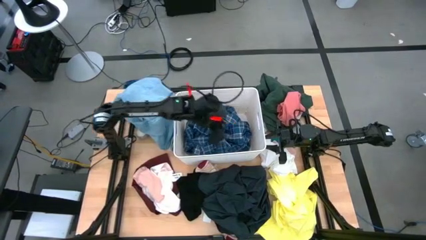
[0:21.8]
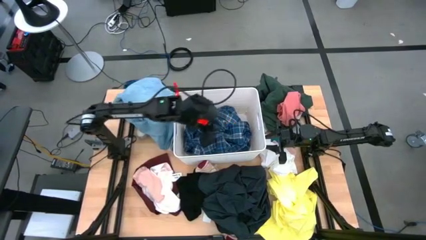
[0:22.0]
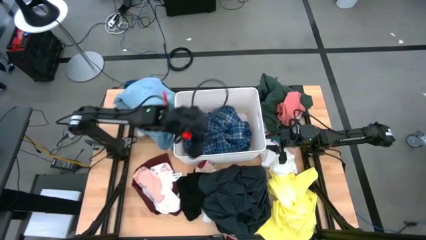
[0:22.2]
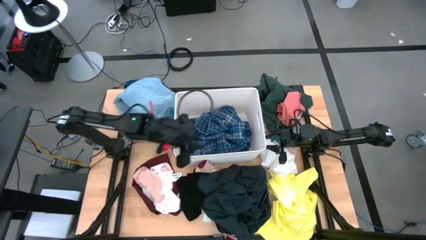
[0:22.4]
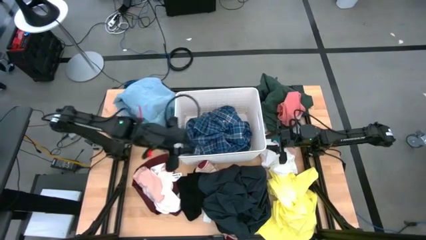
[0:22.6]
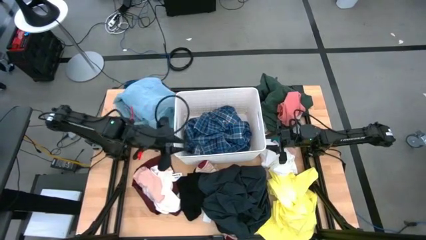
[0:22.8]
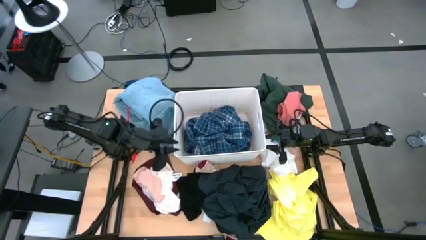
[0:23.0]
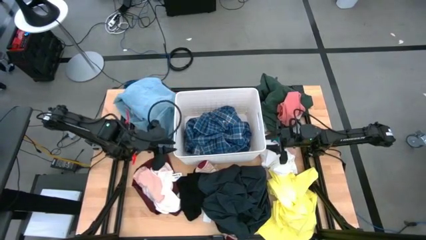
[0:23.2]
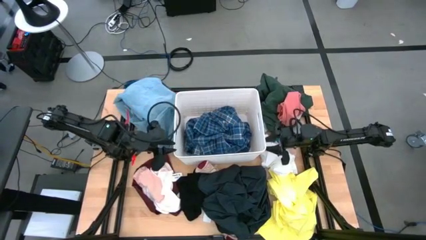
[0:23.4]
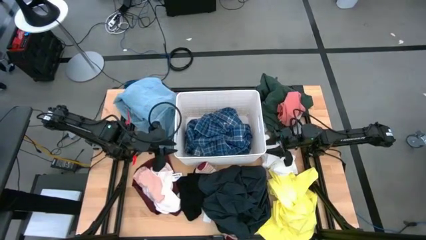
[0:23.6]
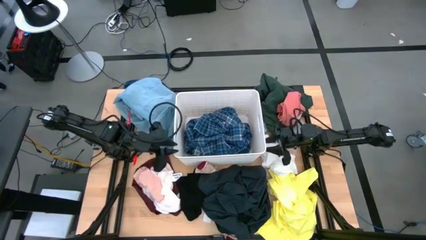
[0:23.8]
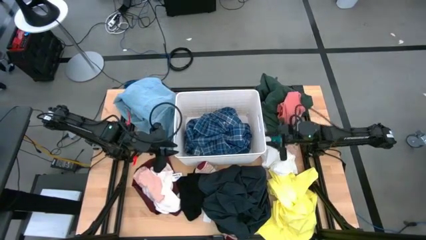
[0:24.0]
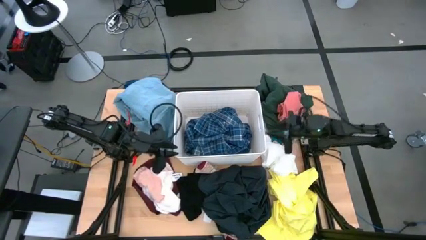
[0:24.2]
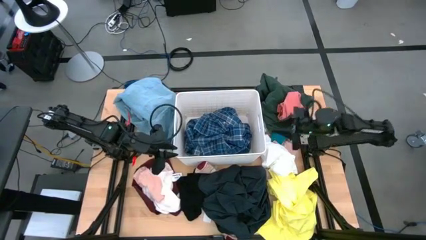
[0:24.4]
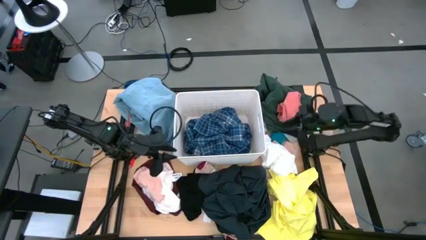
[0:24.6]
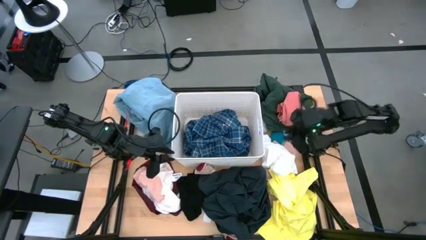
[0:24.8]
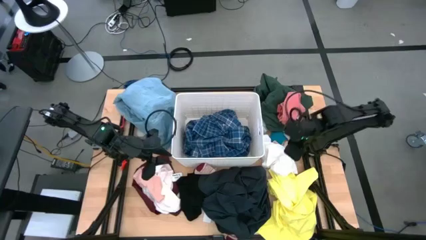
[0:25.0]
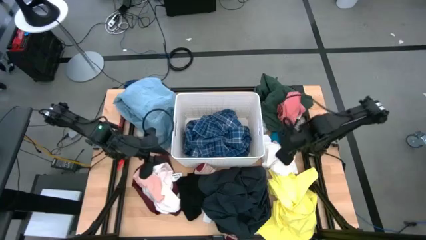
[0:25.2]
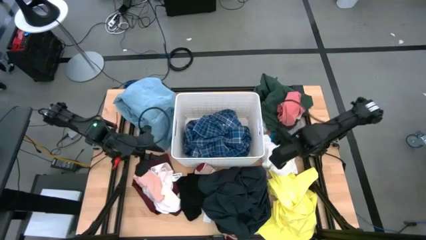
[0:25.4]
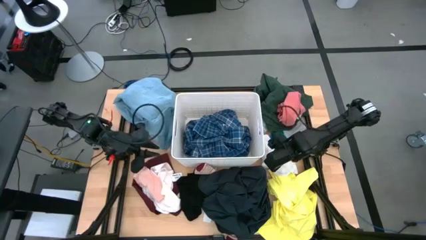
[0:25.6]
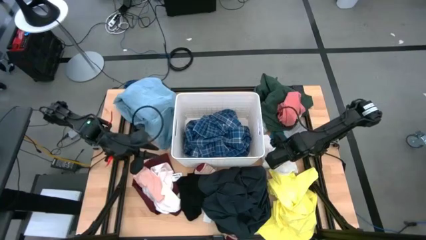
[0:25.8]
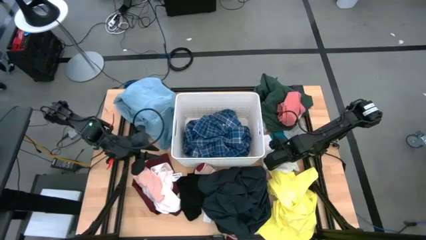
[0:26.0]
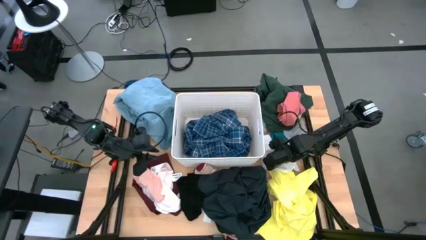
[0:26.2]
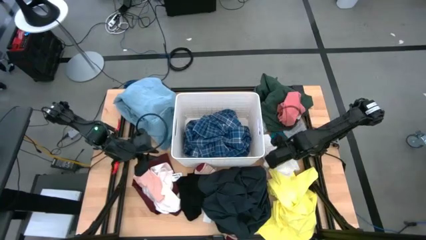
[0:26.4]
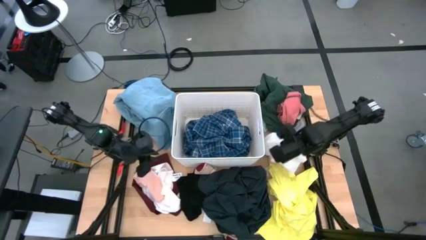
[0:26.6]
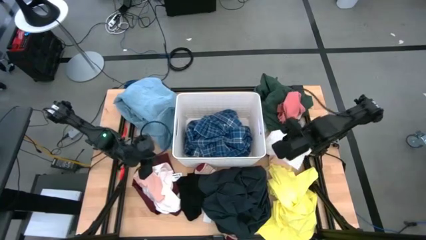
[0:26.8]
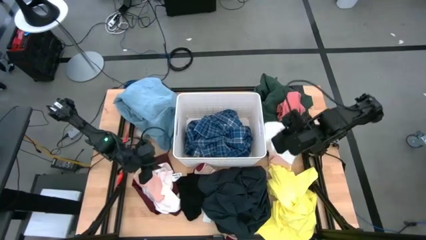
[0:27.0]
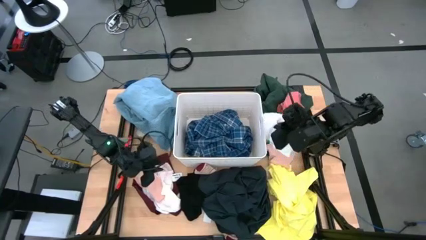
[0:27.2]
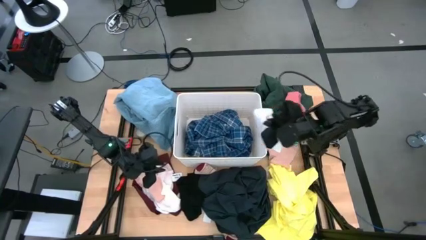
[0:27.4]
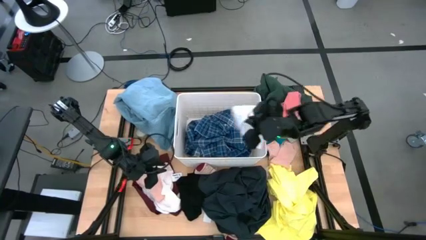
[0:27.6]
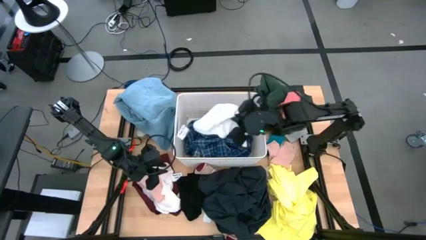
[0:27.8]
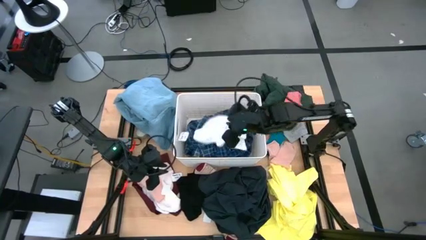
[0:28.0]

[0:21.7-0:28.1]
Task: Sort clothes
Put the white shirt into the laundry bin

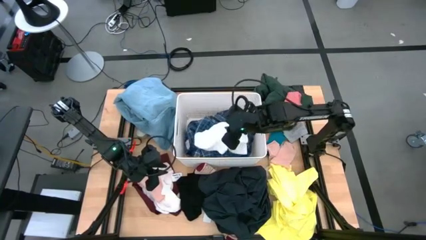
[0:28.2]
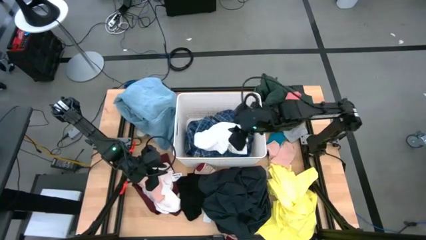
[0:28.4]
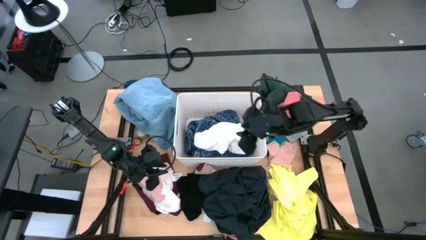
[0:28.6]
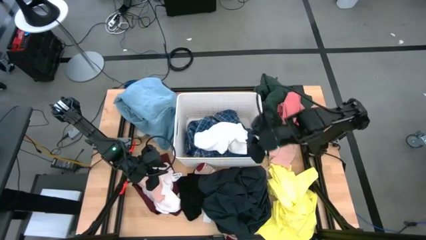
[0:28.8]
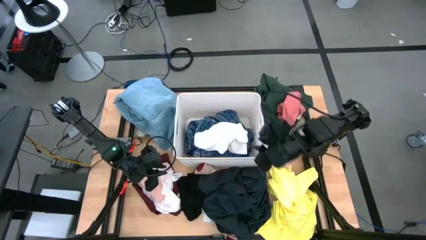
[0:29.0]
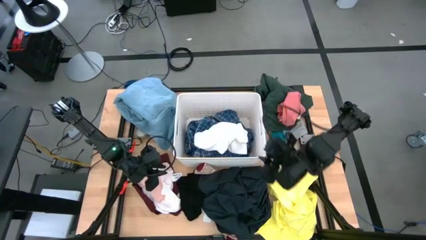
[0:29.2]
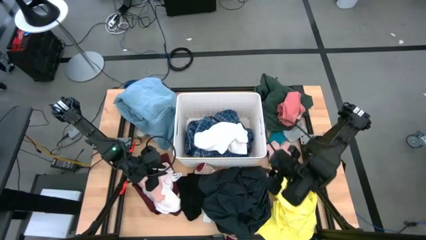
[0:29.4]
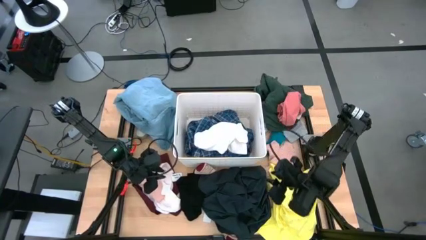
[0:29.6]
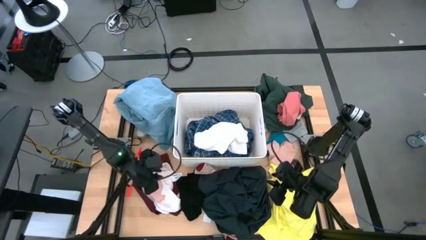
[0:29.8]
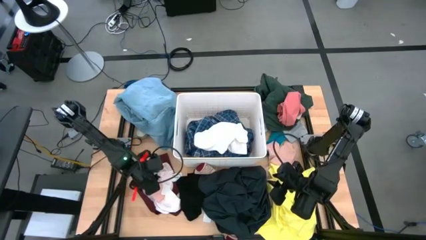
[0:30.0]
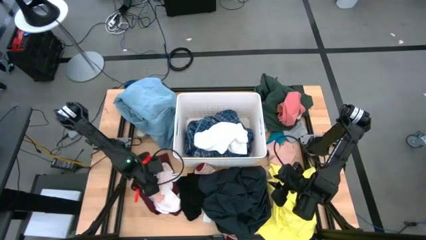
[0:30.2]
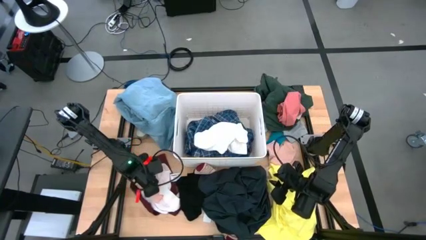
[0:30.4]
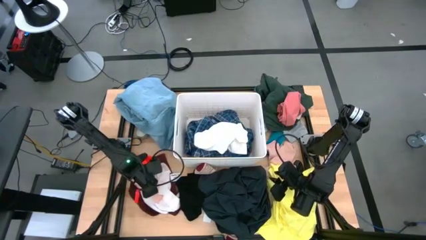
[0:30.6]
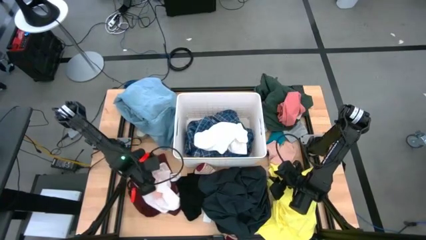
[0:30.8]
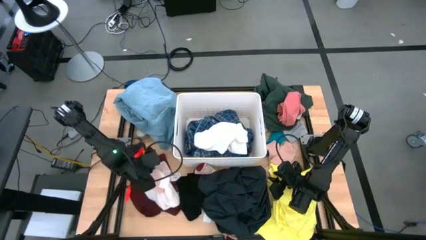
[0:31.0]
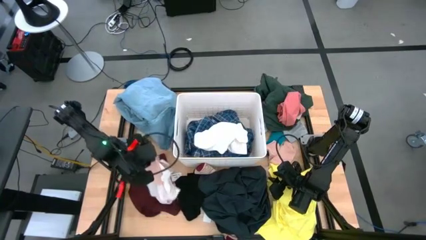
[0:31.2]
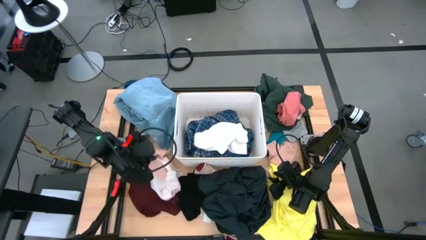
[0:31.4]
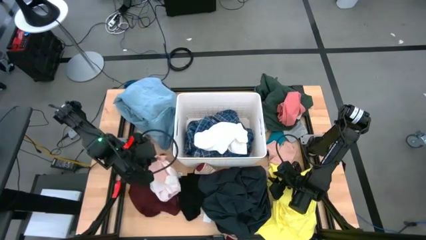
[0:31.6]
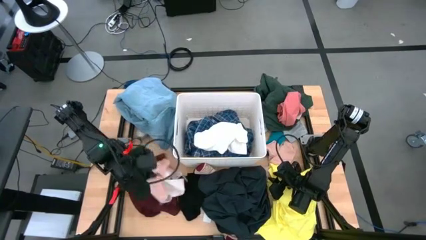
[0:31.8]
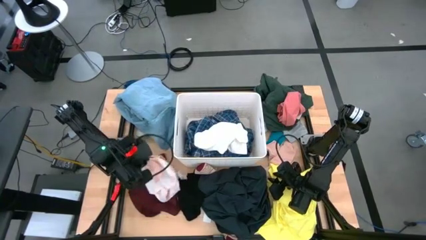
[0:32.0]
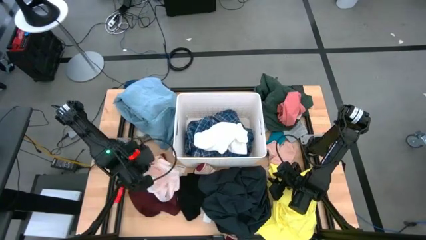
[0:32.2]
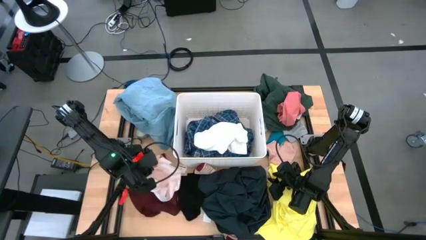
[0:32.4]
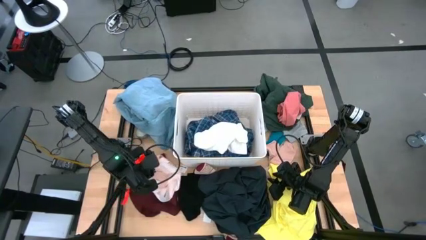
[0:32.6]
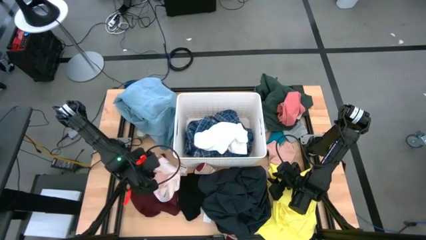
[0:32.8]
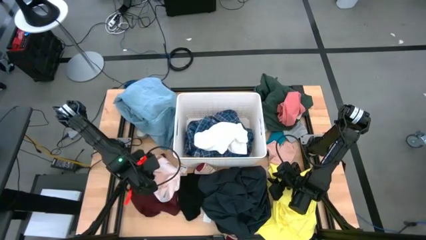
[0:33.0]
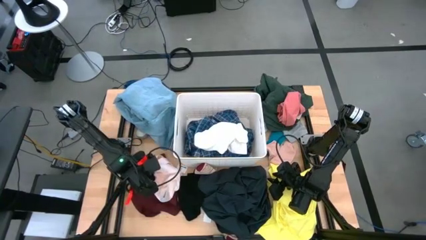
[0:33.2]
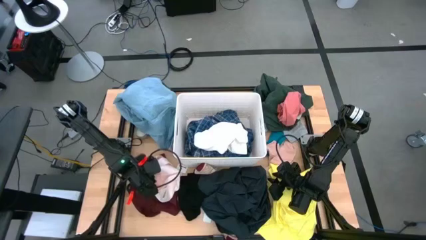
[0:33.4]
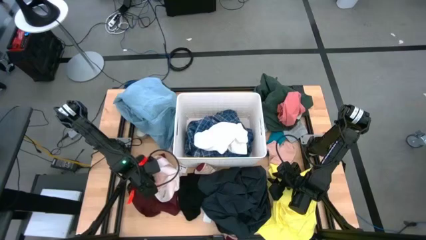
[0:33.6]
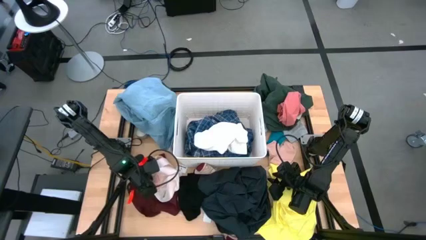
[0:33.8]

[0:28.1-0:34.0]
Put the light orange shirt into the laundry bin

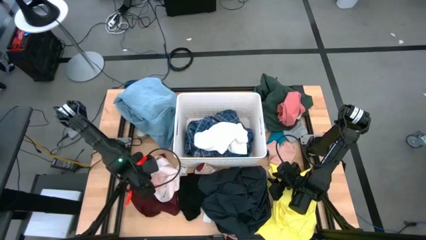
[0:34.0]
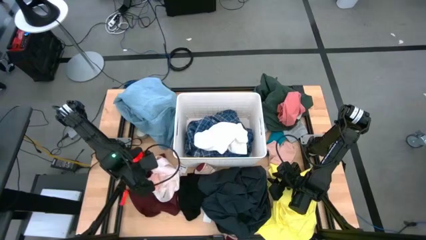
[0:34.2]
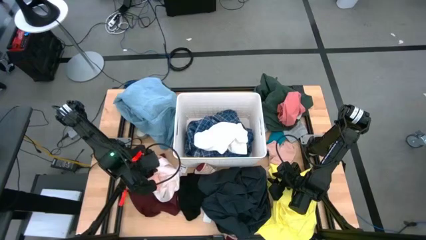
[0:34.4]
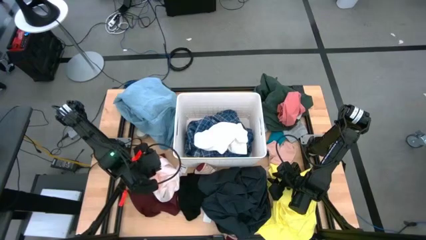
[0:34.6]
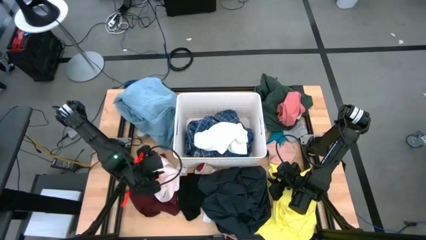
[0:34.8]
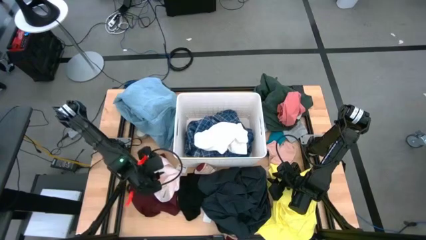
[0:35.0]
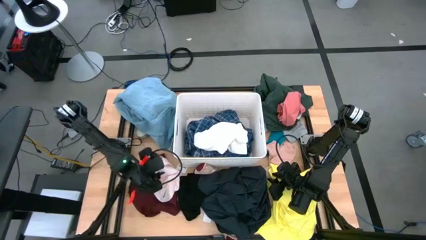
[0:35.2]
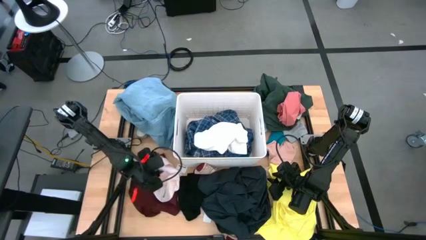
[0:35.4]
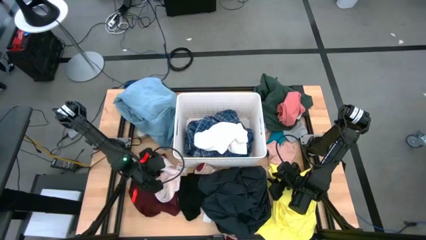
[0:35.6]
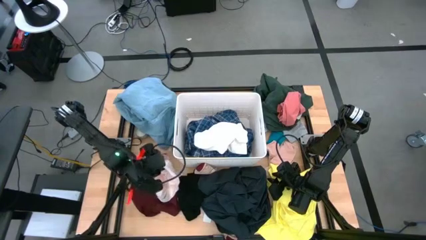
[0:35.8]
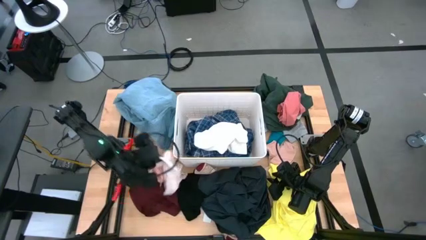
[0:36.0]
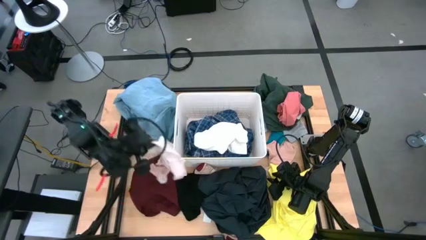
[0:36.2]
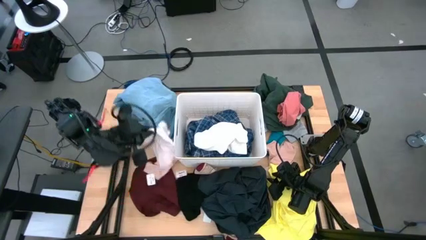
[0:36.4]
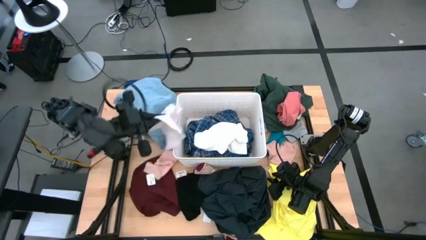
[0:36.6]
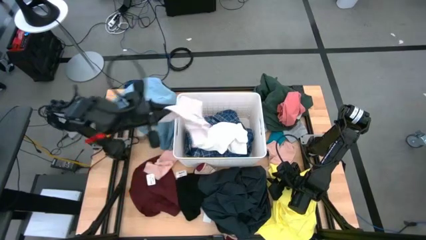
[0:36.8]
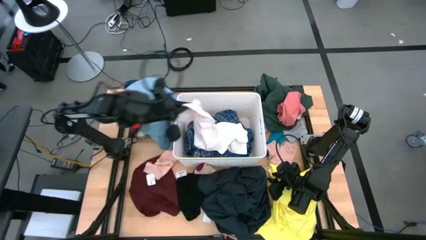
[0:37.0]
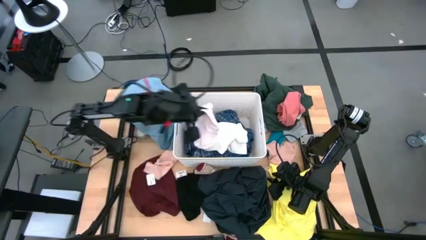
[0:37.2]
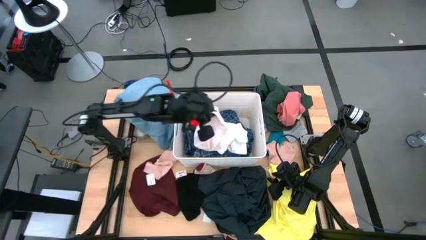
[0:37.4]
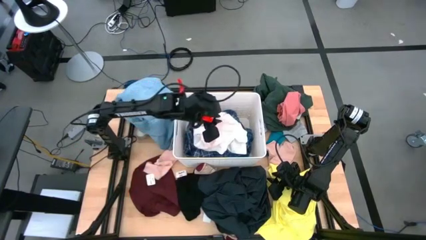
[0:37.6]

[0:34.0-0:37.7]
Put the light orange shirt into the laundry bin
